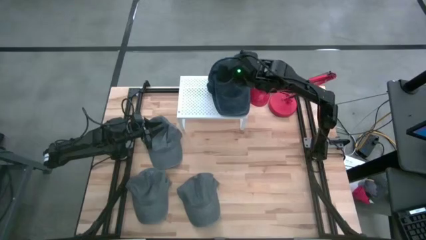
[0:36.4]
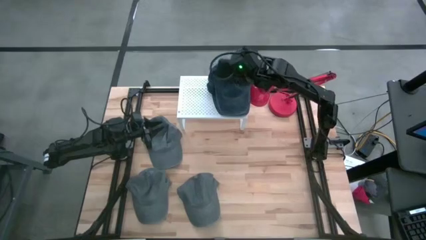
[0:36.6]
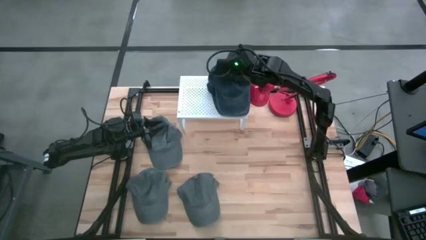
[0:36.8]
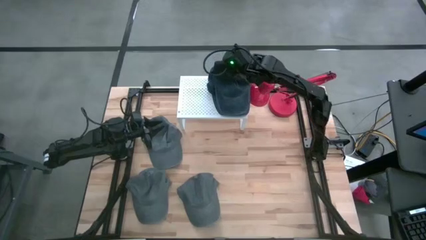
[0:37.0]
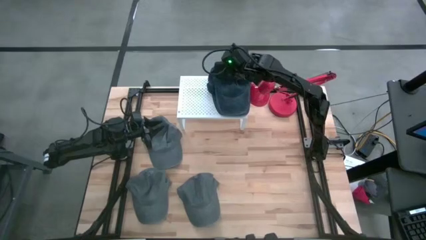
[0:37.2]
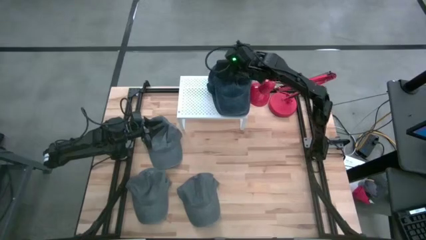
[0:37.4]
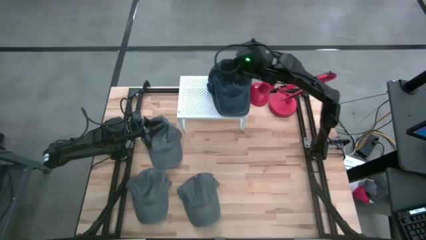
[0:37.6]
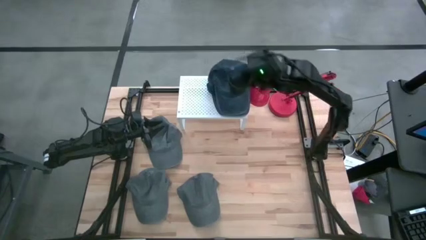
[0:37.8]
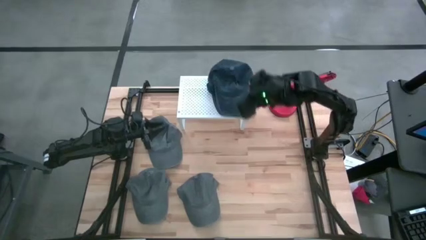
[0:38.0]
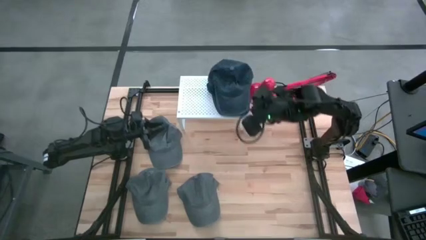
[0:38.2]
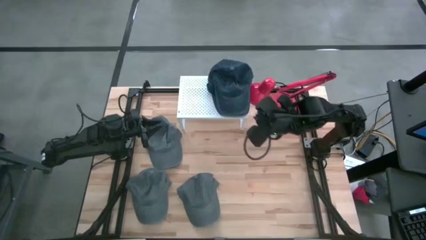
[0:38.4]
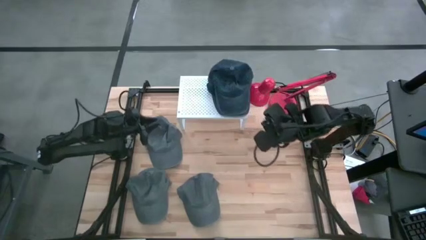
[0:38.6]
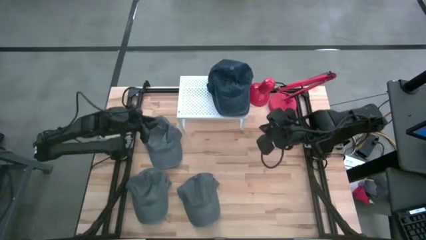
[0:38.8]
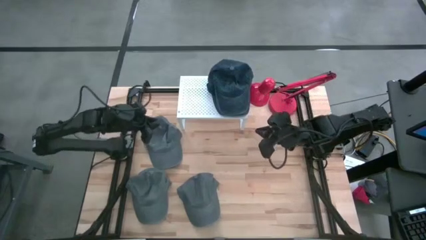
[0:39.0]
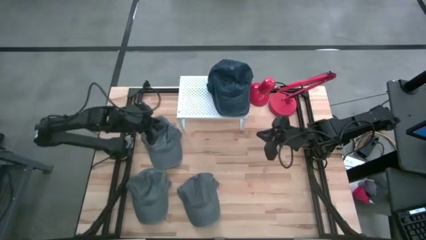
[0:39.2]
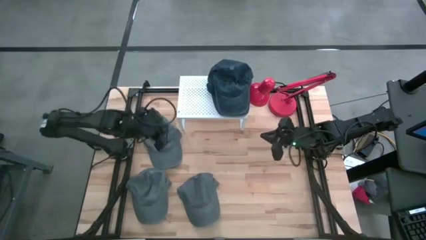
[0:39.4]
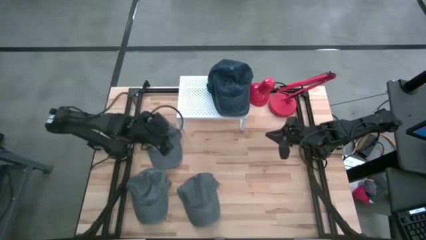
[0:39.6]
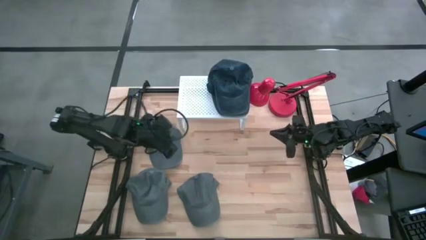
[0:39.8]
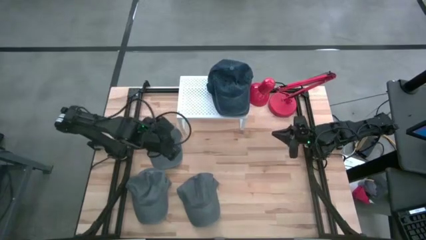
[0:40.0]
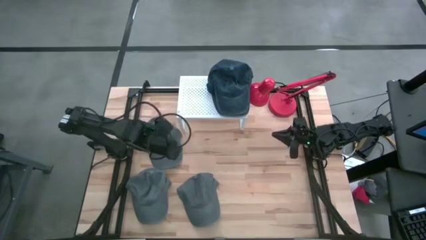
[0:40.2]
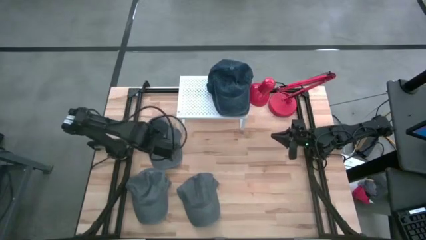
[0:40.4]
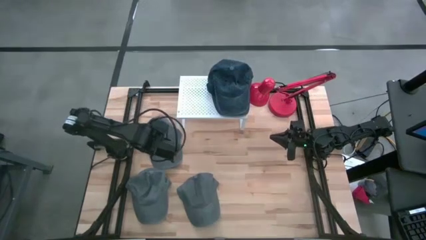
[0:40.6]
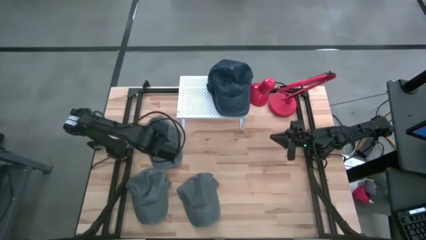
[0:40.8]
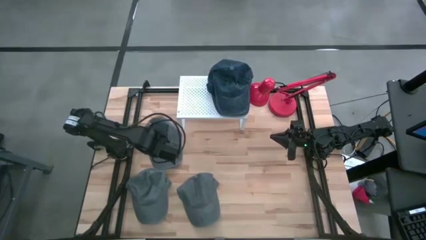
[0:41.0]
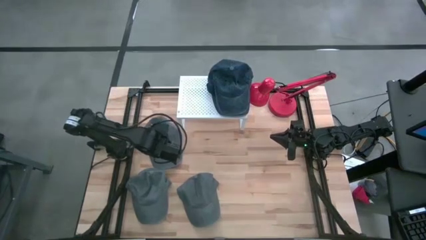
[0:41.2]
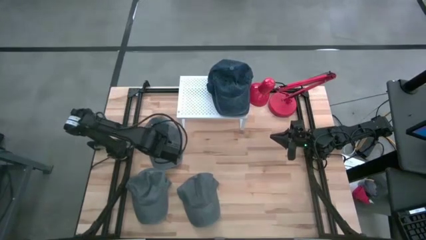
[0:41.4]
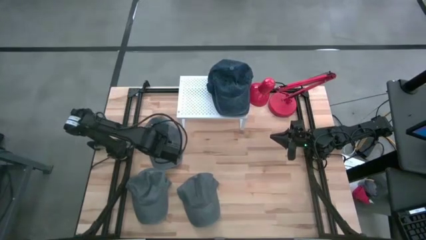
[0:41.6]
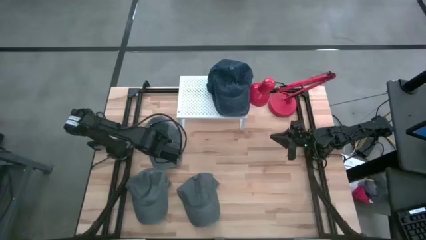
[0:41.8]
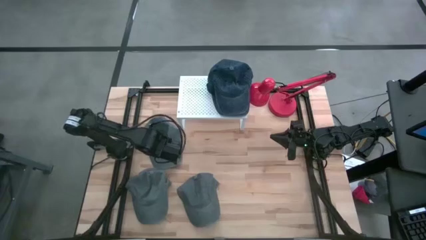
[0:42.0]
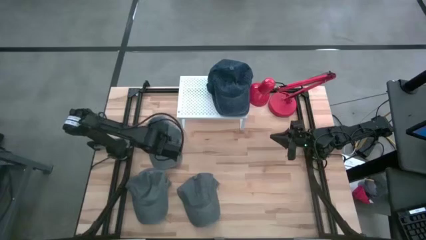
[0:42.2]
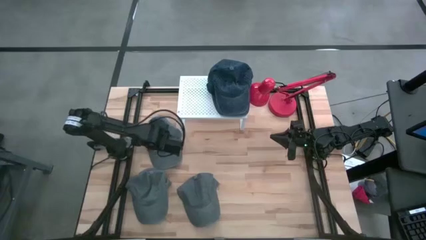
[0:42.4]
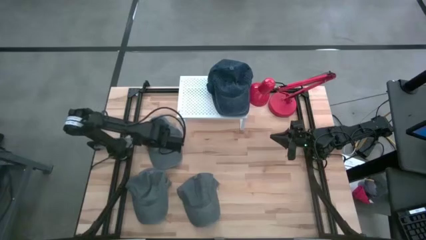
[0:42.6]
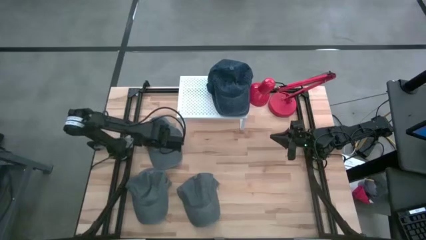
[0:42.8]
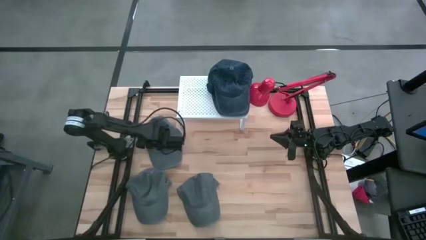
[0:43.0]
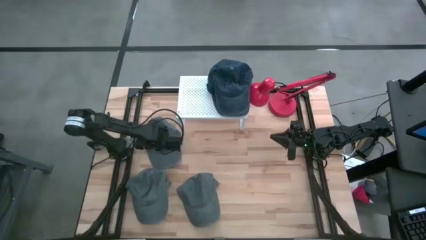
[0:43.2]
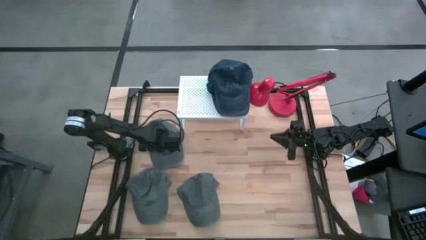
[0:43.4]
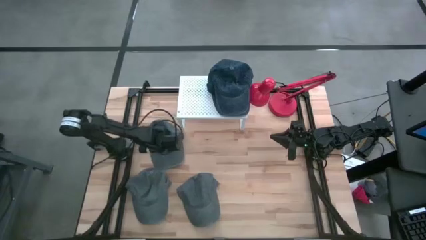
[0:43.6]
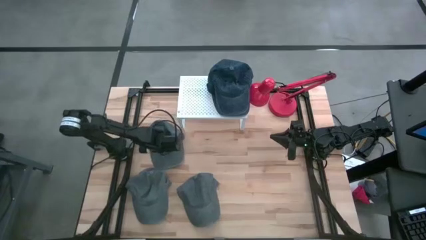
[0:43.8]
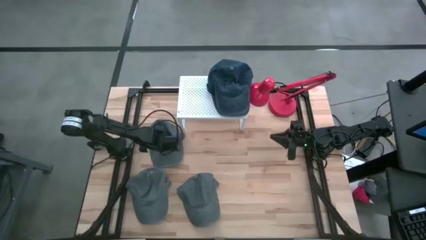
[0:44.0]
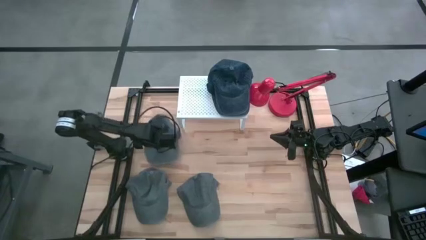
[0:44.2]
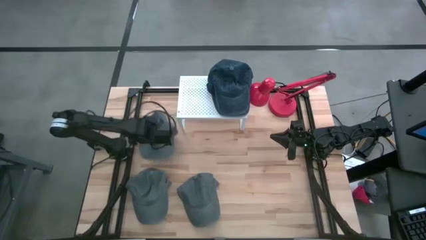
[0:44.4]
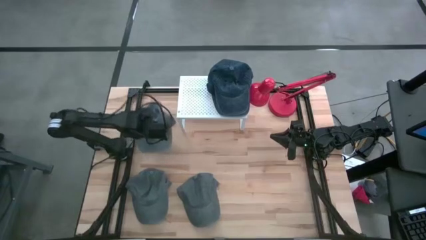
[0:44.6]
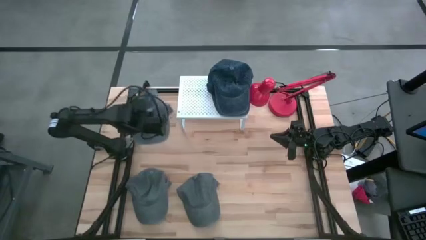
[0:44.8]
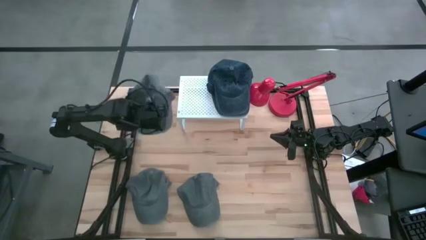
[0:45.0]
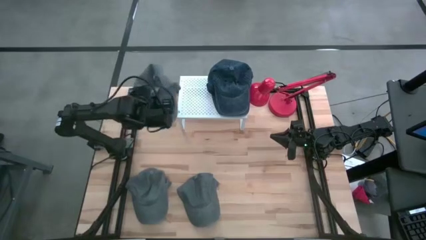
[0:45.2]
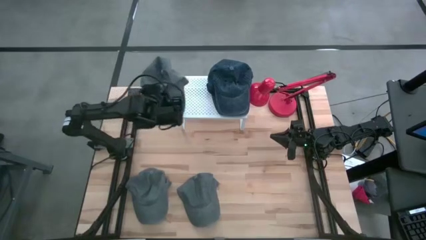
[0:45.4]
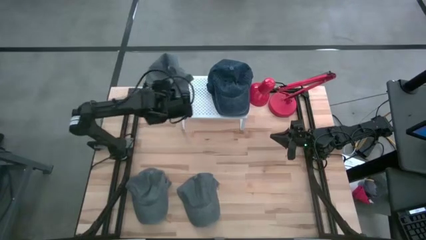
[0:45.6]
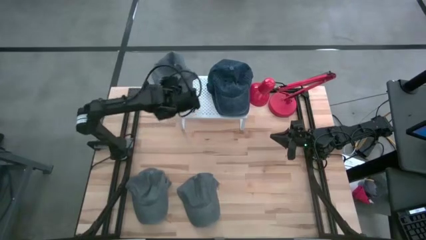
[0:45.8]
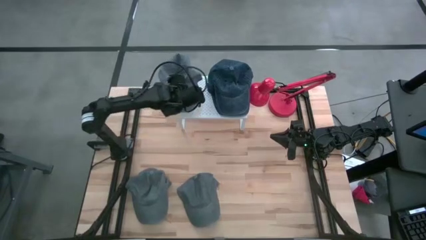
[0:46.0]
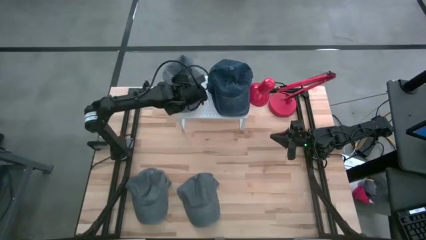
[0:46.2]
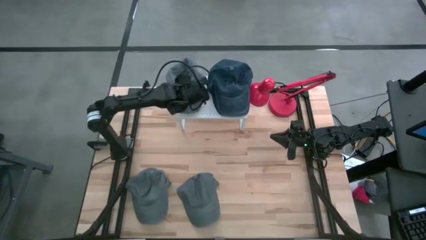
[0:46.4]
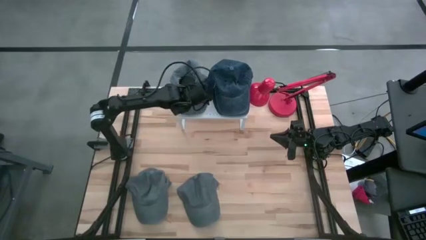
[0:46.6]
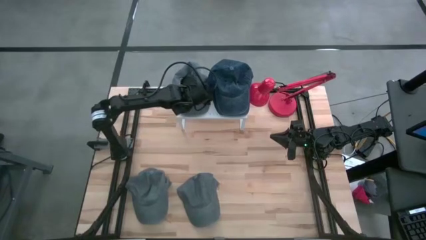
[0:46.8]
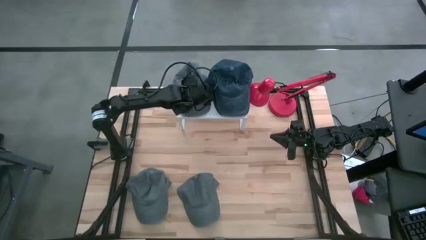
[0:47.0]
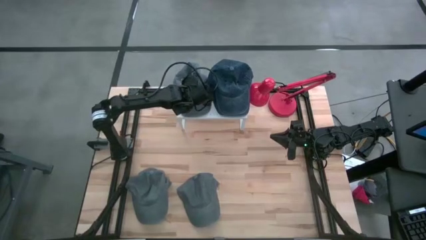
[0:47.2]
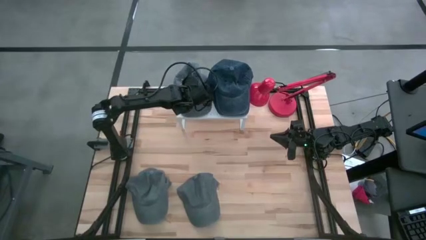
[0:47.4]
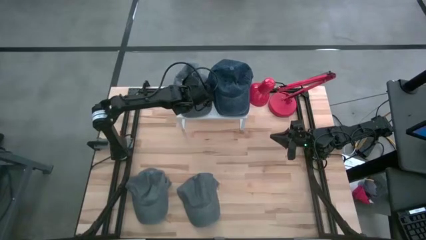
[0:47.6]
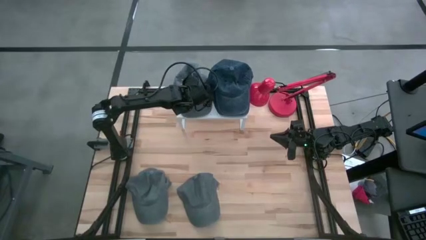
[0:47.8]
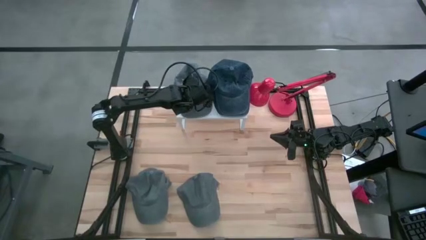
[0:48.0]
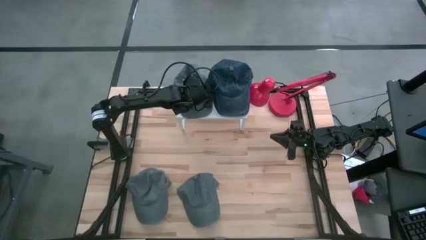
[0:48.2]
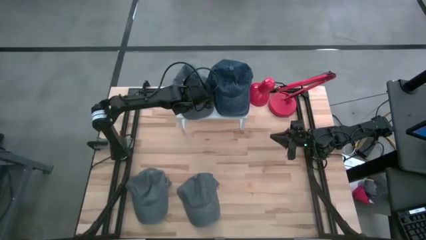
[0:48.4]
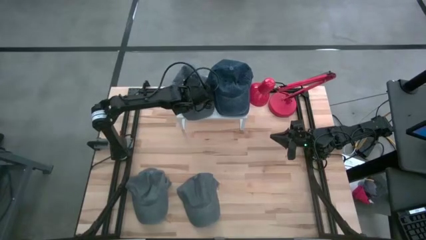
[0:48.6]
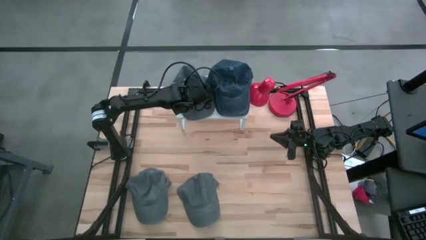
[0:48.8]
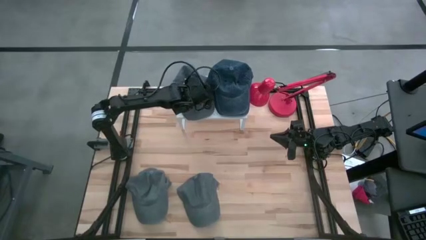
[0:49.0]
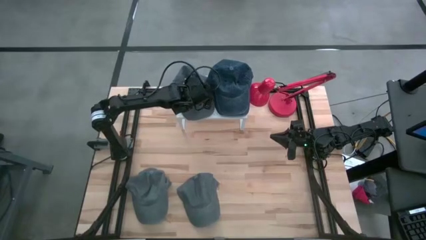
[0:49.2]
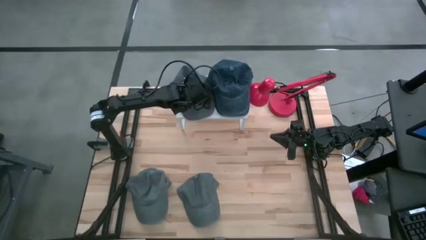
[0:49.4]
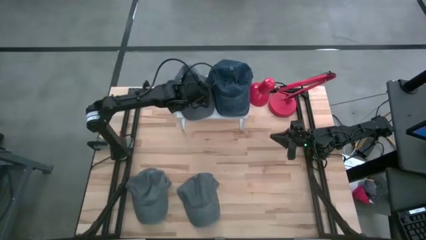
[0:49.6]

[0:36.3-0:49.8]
Task: Pick & Place hat
Put the top left gray cap on the shelf

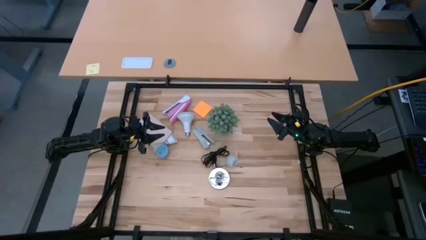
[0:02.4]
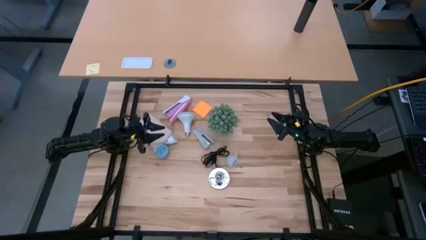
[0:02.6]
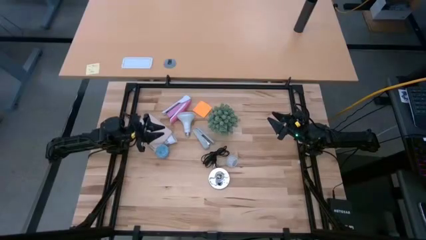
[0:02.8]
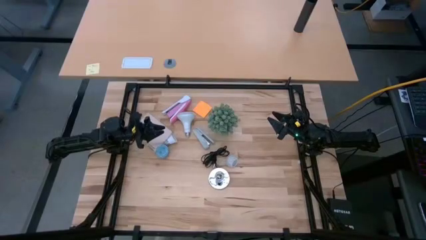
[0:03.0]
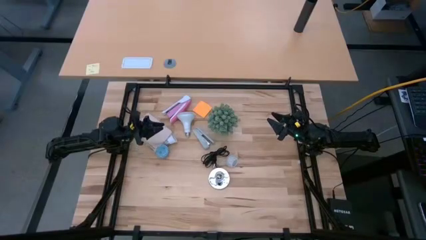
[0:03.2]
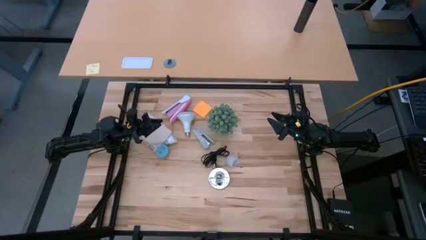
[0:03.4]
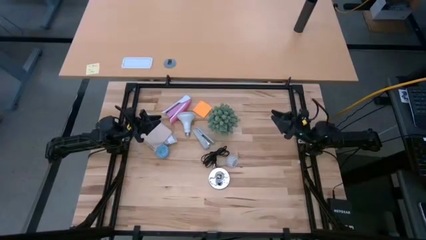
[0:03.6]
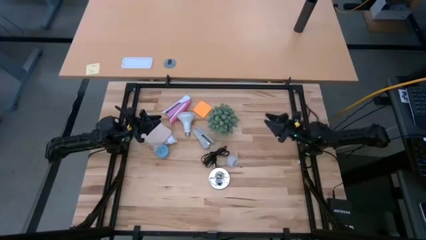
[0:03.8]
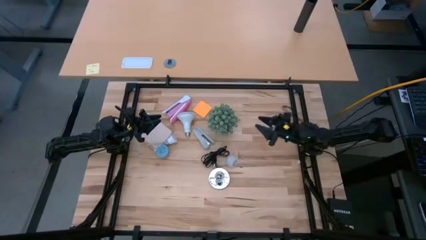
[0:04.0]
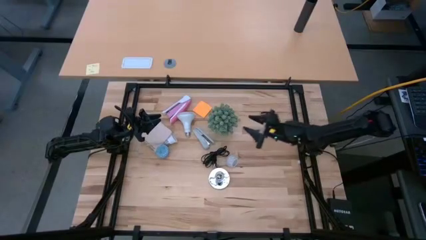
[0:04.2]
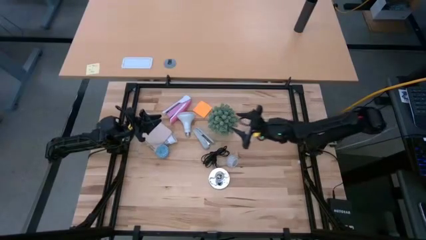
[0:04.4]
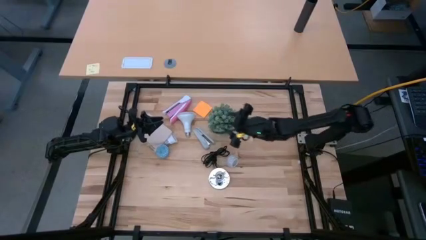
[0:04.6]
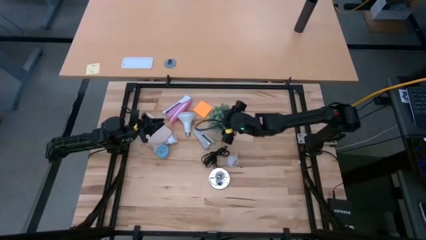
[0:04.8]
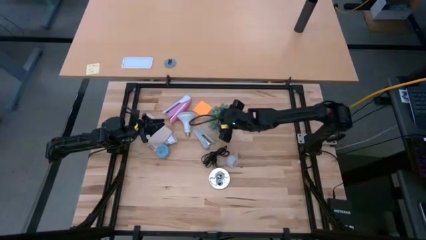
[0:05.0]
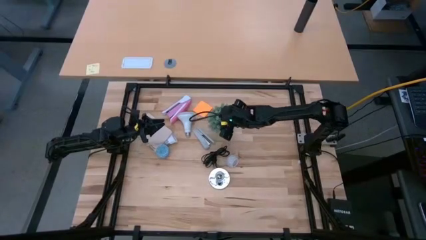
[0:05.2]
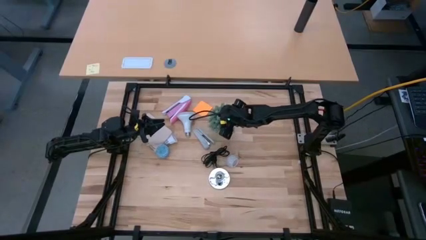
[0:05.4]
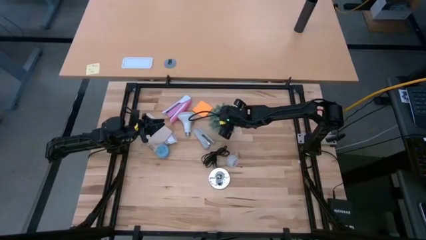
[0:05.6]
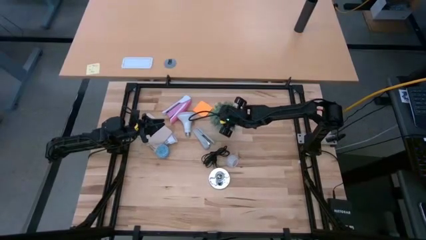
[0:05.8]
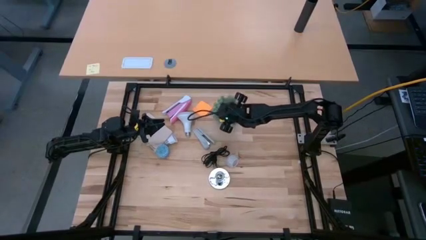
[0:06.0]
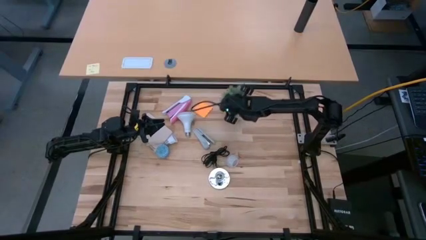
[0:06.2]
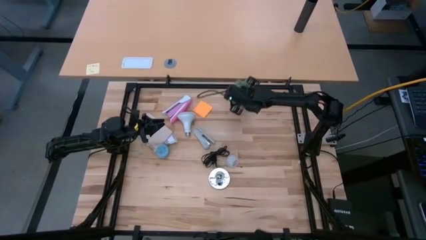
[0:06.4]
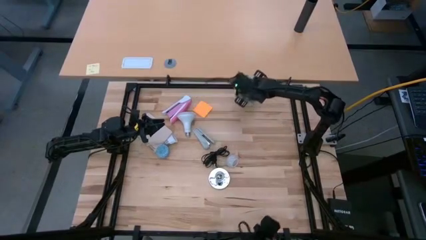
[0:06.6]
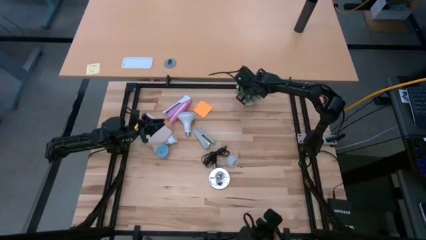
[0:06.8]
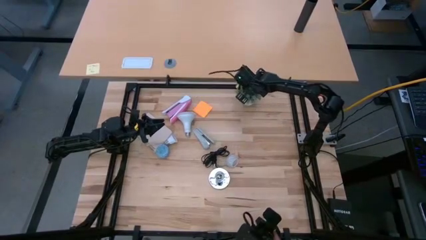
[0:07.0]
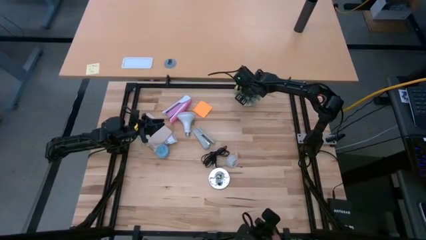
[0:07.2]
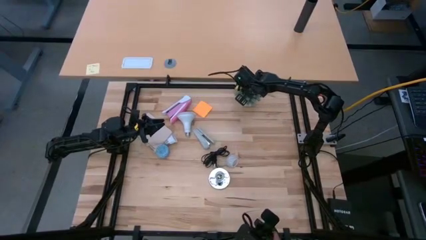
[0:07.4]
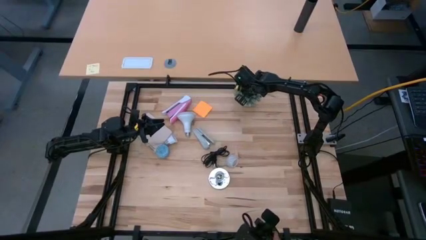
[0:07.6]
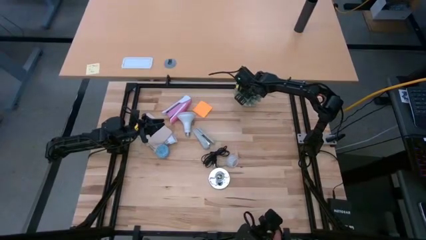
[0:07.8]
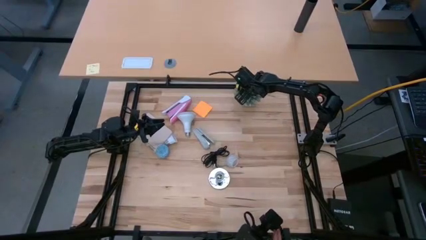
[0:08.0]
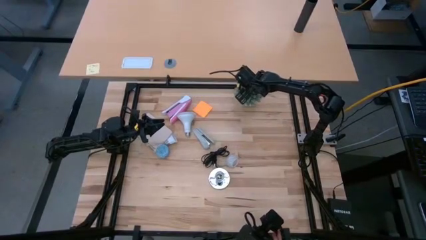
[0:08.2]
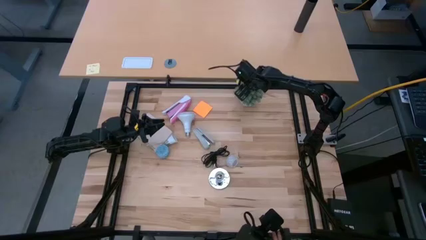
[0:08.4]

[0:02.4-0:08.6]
Task: Screw lightbulb
Move the gray vase plant to the top right of the table
